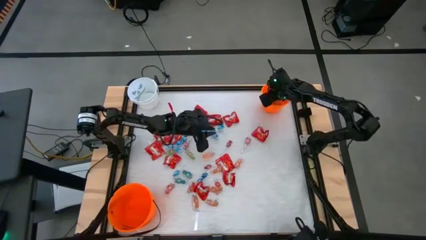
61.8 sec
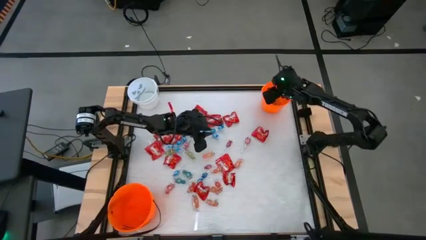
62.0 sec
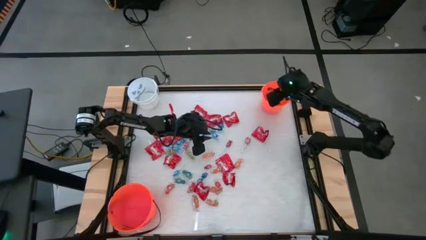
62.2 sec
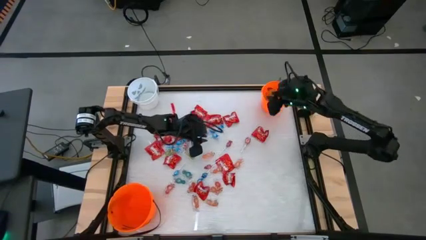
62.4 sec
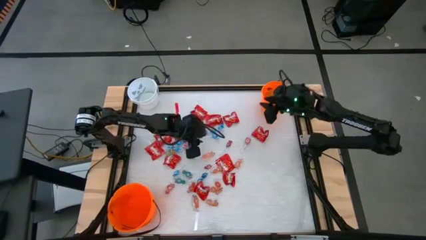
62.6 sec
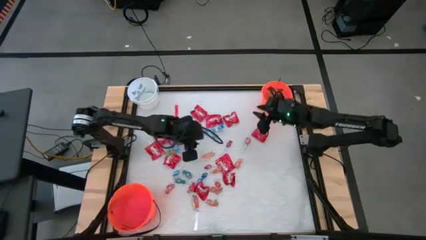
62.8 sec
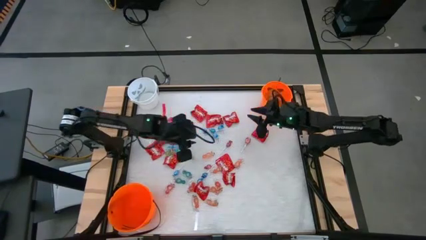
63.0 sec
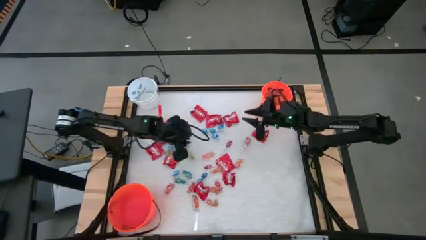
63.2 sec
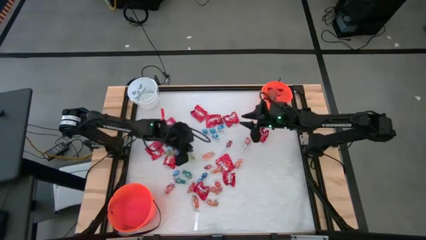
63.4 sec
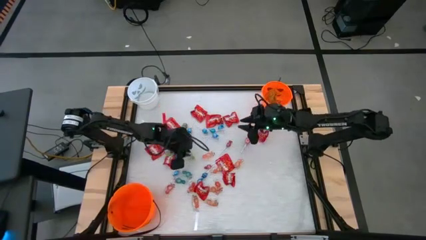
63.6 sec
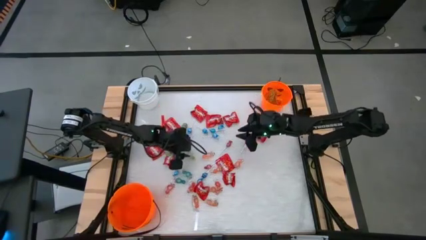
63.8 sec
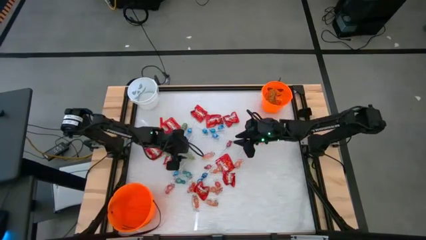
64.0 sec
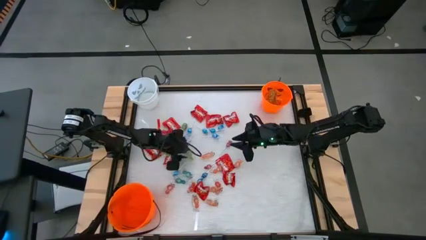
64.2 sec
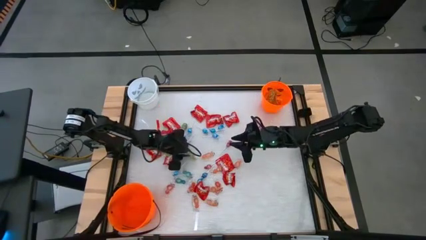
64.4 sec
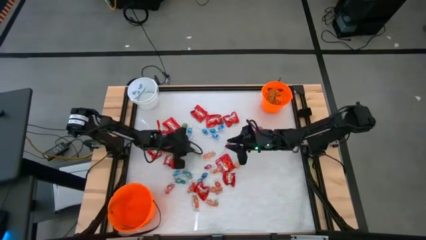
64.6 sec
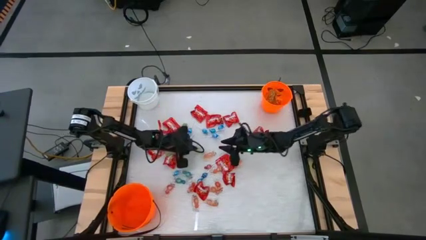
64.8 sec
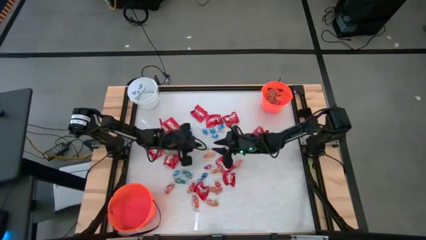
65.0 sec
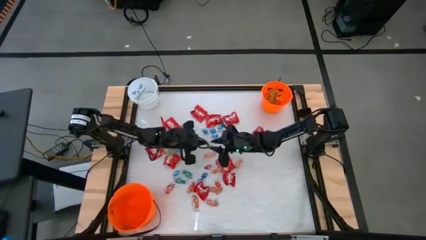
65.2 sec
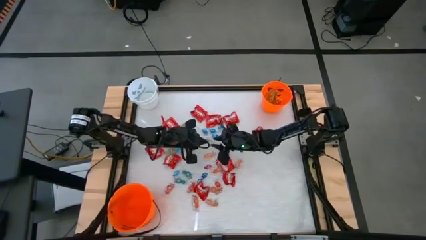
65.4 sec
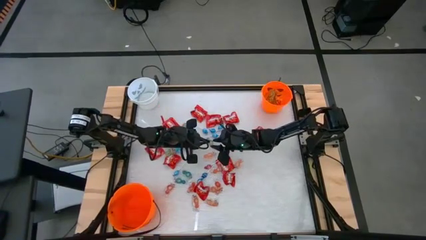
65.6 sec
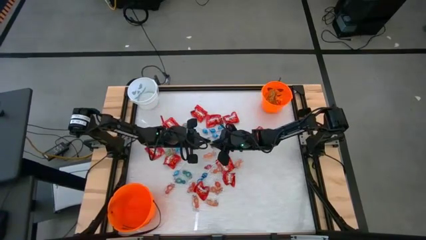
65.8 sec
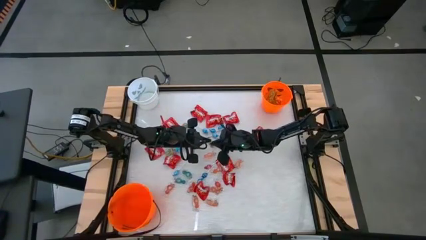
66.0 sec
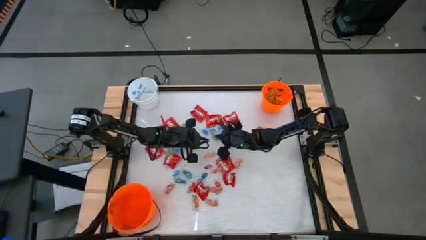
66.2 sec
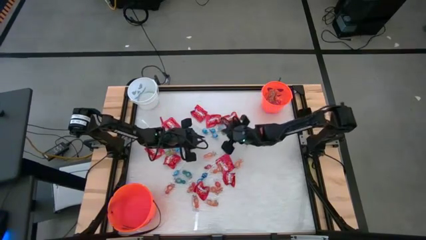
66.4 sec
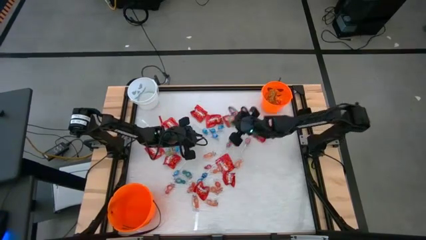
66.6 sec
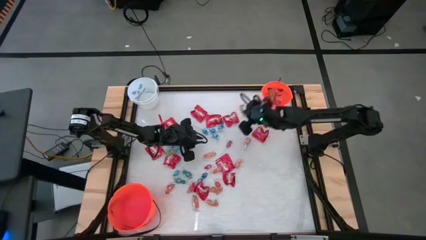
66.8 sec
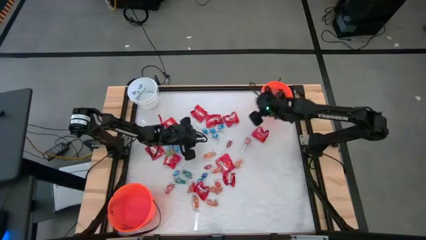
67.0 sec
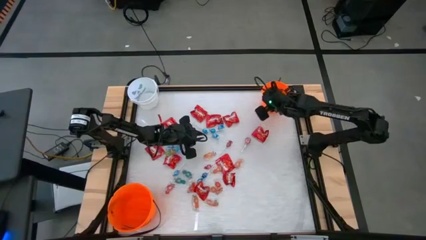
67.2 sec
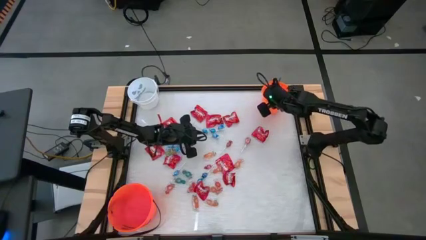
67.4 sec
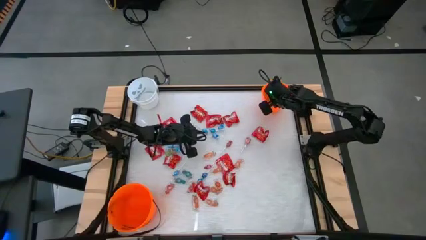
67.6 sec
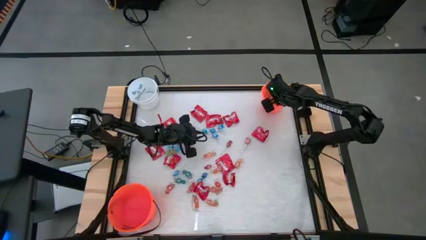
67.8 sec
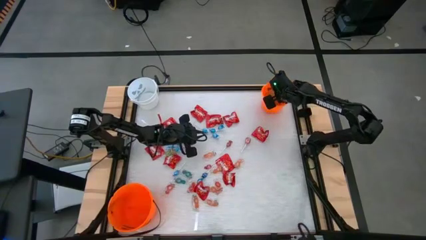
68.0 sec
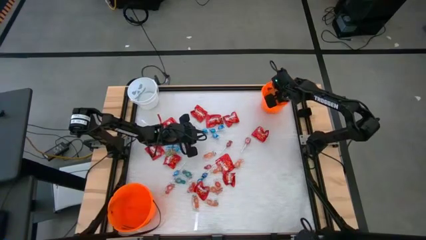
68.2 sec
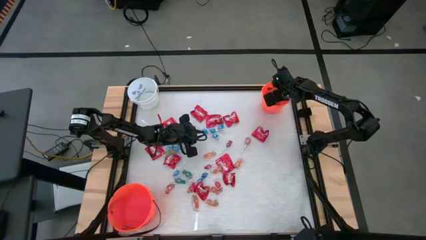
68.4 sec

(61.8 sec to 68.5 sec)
Task: Sort candy by brand, put in halloween buckets
Put the right green gummy into the top orange bucket

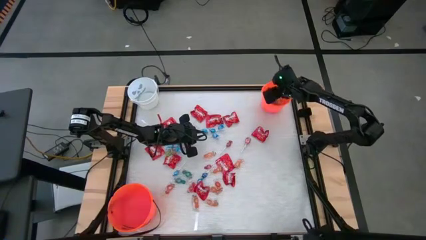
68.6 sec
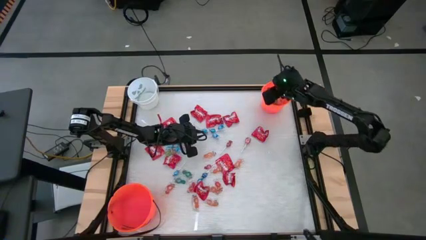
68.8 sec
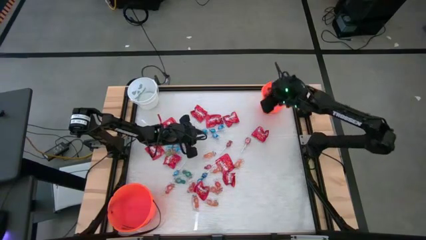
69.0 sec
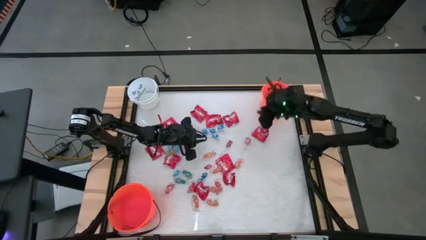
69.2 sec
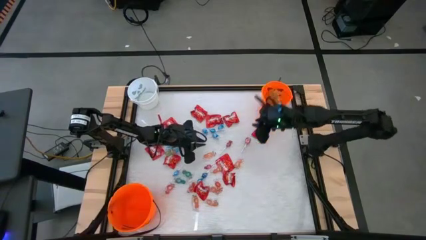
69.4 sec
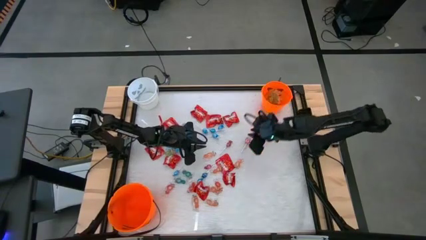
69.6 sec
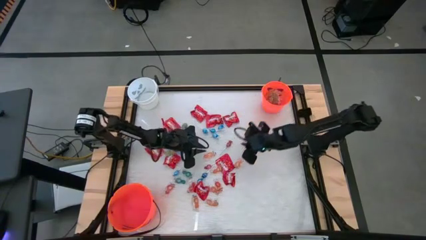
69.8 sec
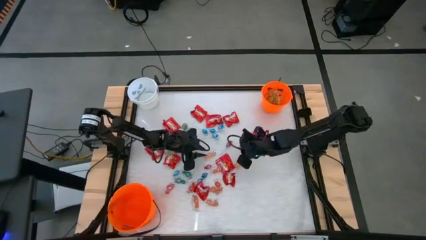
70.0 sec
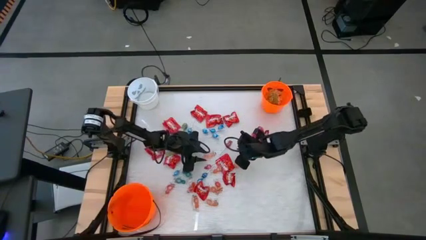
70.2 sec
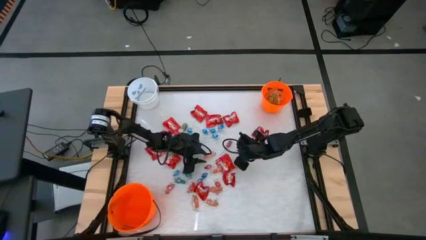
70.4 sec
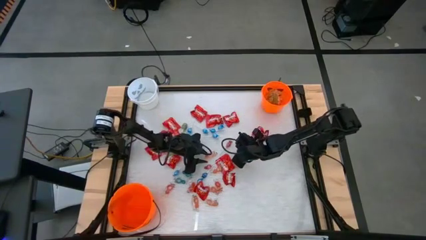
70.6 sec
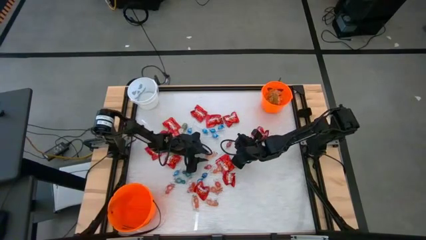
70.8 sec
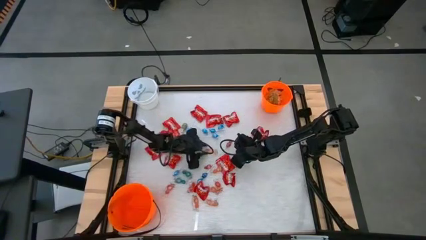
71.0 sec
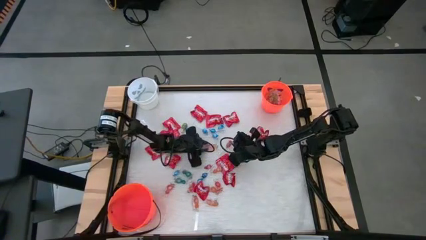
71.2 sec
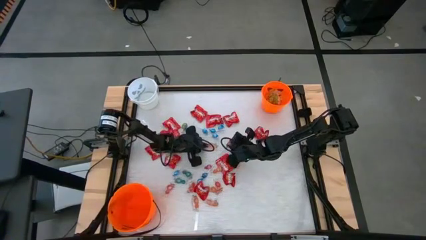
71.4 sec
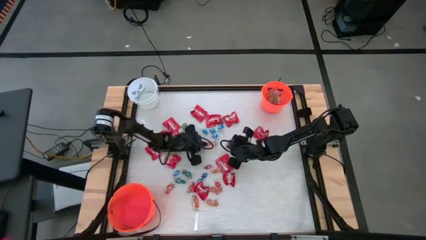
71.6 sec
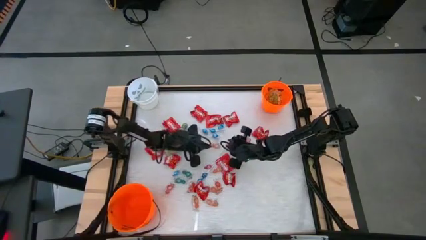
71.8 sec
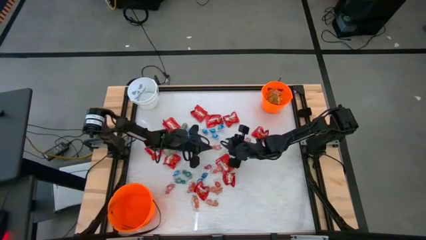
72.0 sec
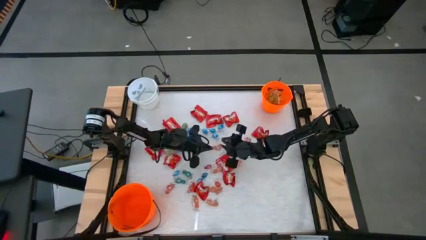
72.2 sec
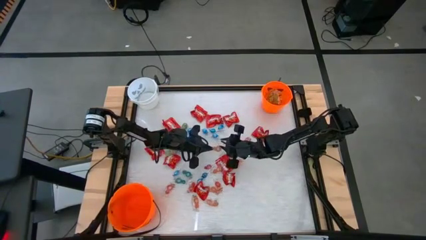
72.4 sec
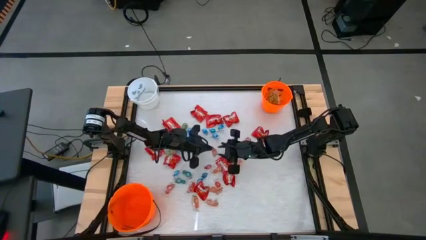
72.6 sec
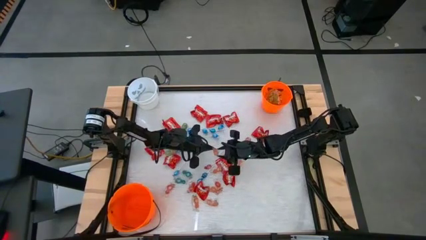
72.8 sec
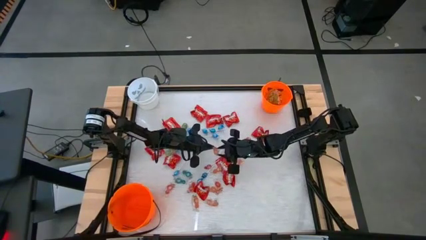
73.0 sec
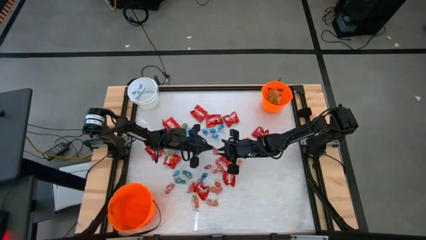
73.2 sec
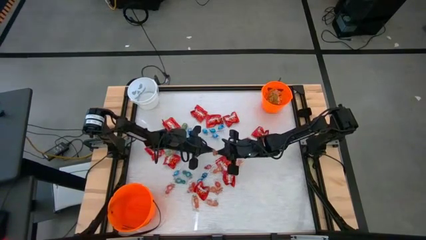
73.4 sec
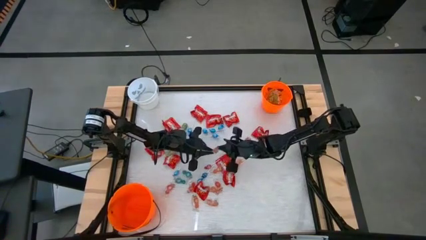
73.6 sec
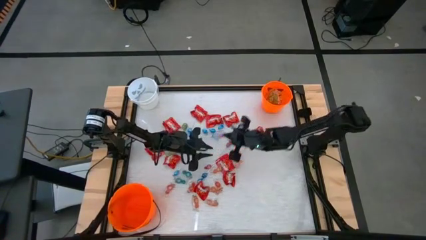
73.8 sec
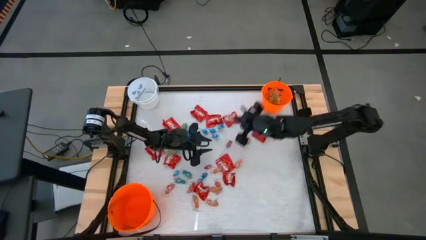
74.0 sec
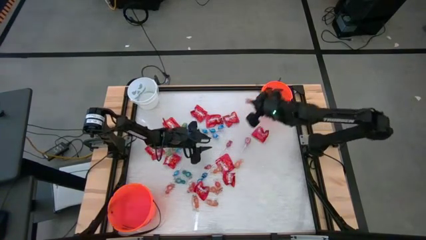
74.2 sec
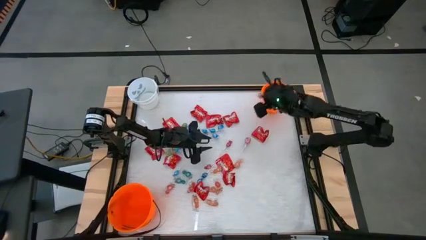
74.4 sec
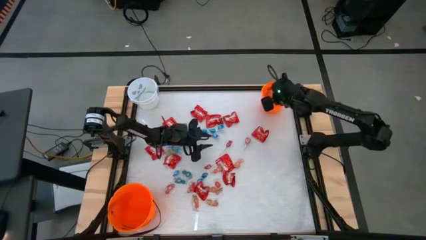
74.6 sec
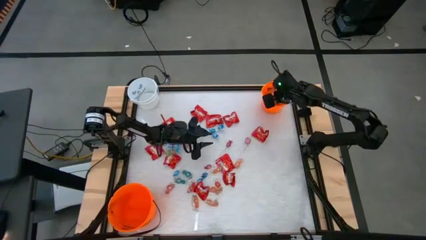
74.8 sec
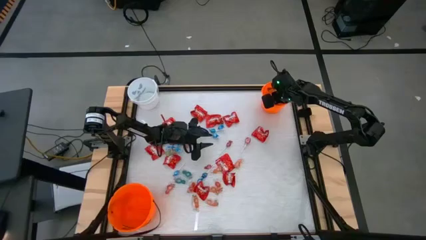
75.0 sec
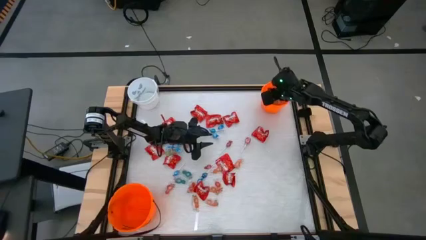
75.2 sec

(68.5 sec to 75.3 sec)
Put the orange gummy into the top orange bucket

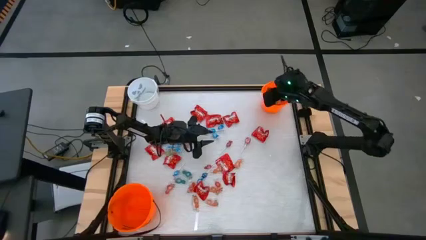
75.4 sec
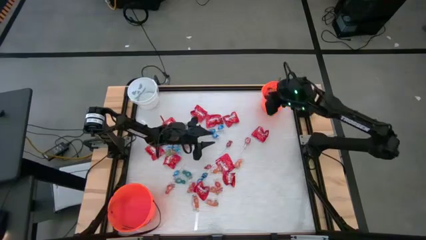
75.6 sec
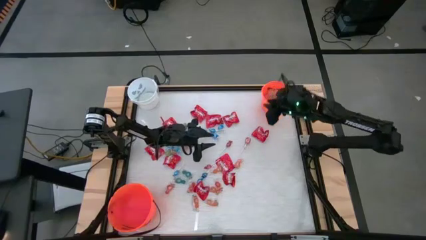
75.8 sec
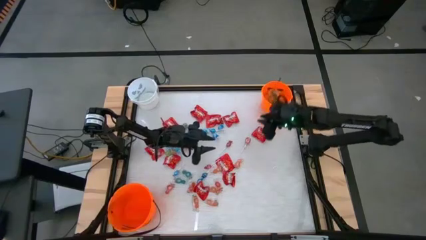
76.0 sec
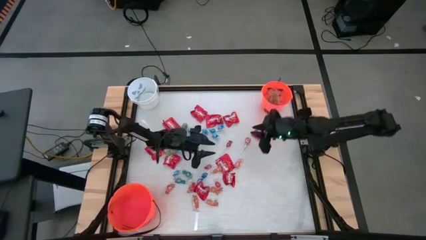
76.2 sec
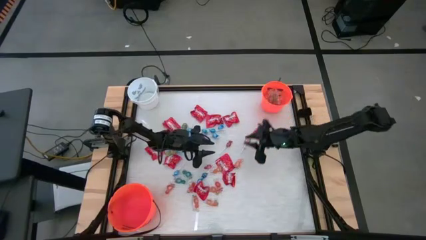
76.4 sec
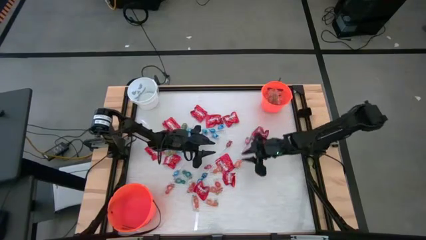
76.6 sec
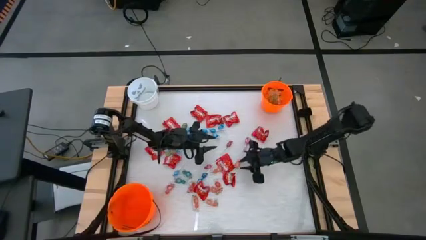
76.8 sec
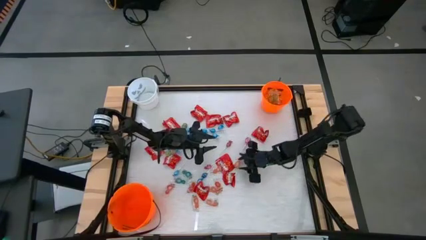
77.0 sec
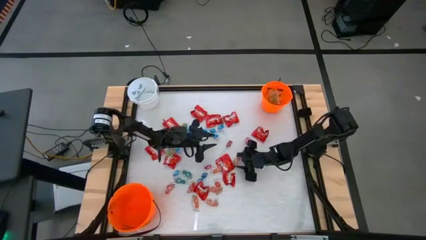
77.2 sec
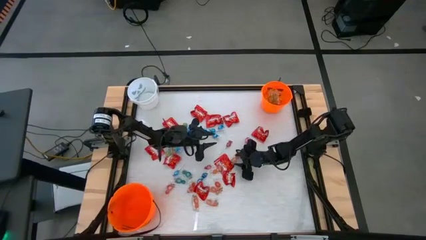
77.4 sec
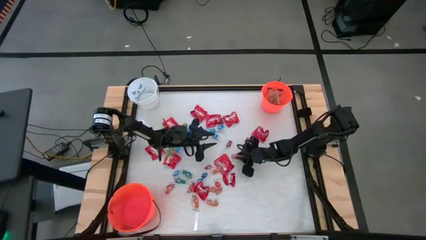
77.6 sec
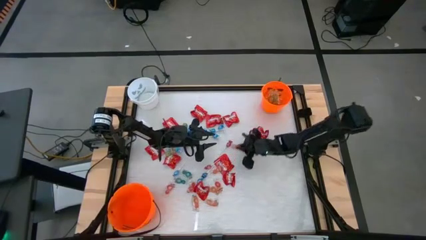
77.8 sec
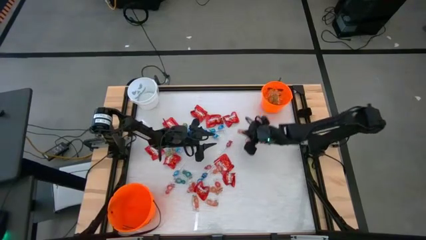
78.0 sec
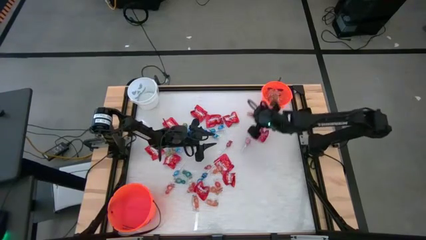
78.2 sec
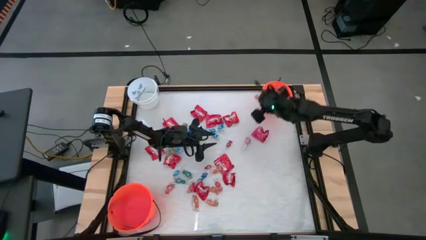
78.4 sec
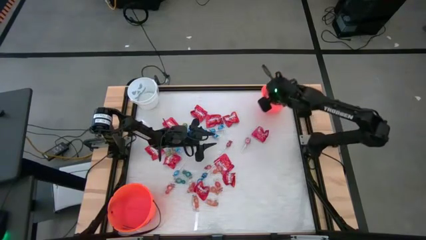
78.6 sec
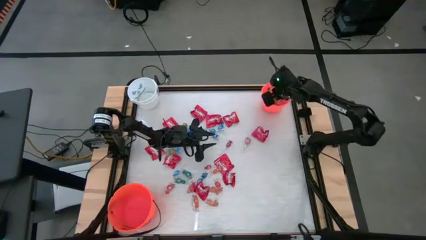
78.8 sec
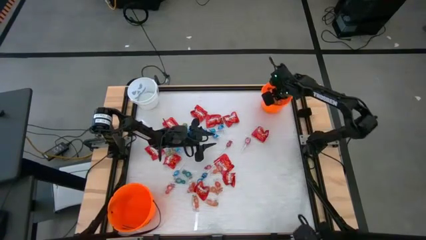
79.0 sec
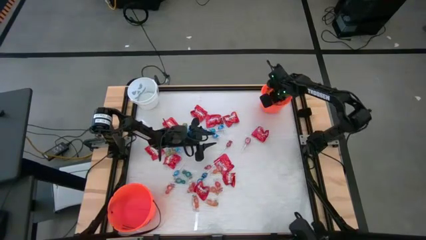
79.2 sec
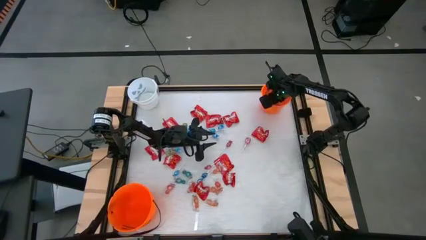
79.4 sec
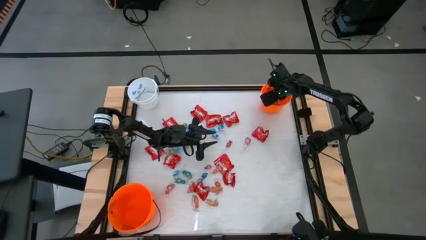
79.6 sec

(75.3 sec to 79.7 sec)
Put the orange gummy into the top orange bucket
